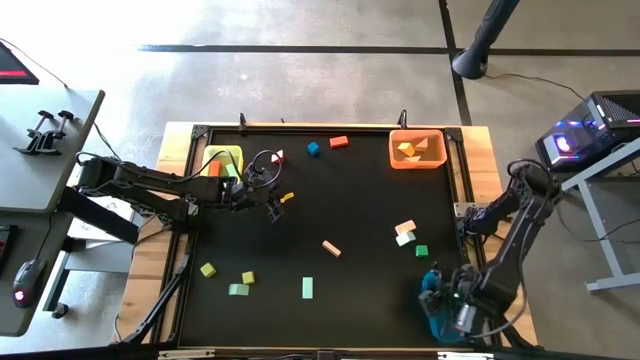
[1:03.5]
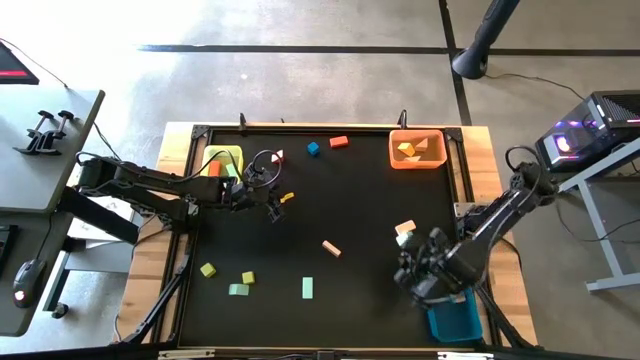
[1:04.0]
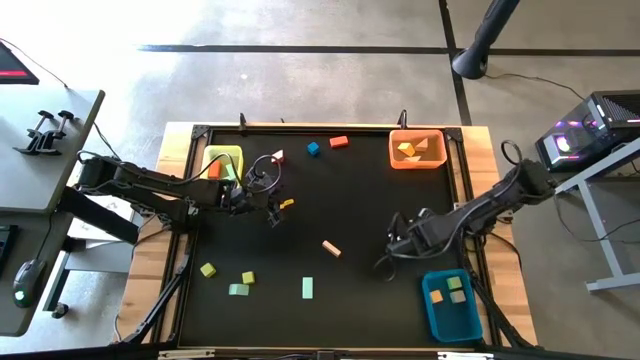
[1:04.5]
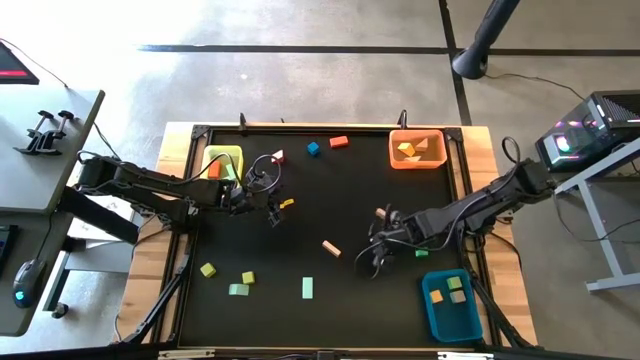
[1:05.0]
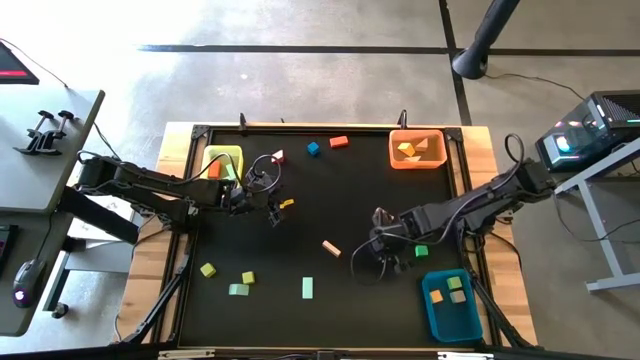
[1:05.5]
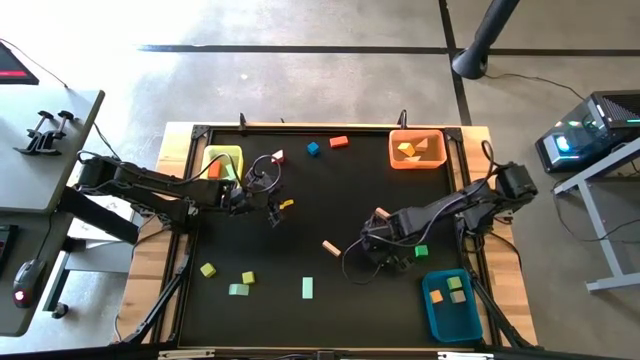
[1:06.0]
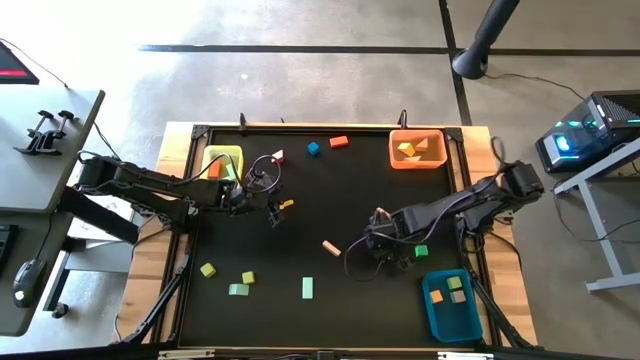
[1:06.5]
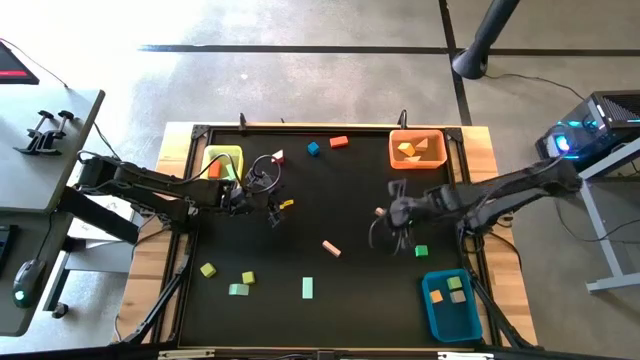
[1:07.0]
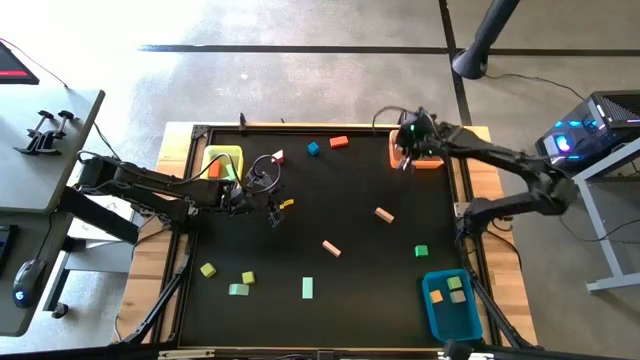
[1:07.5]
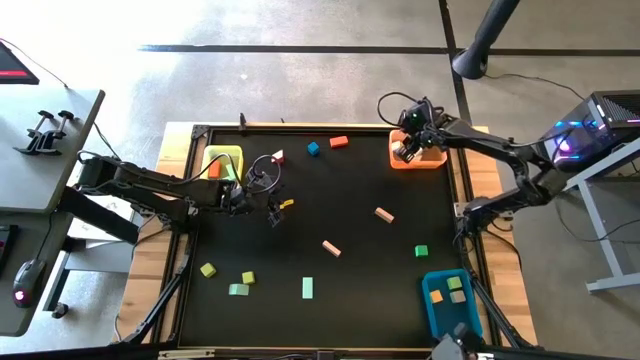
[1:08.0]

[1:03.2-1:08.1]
Task: Sort blocks by size
Put the light blue triangular block into the orange bin

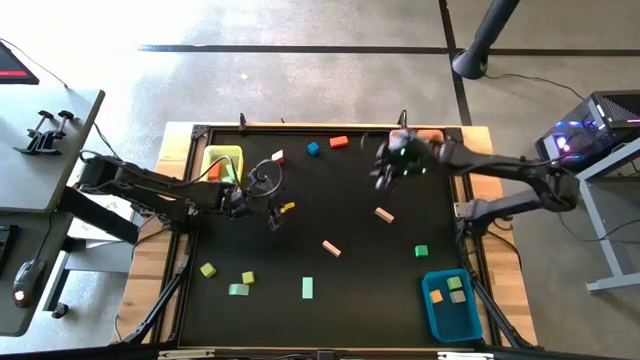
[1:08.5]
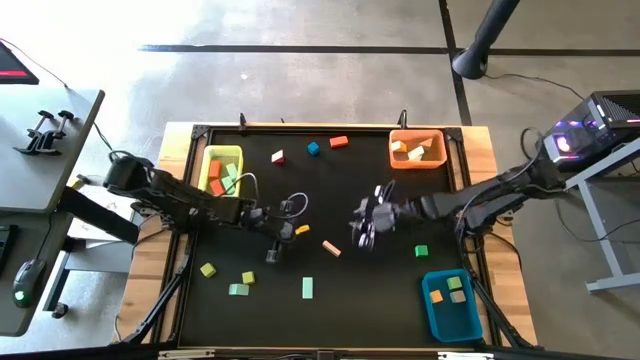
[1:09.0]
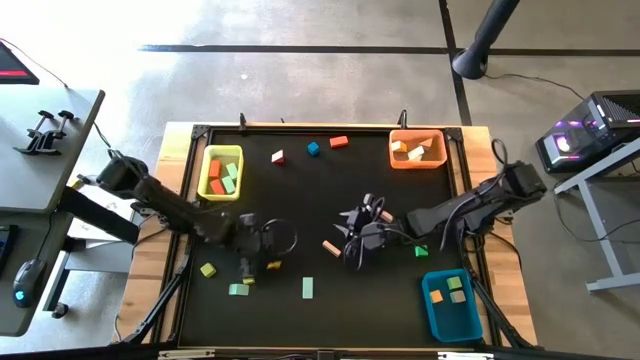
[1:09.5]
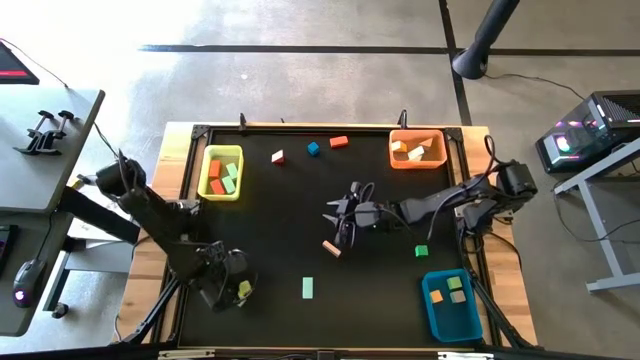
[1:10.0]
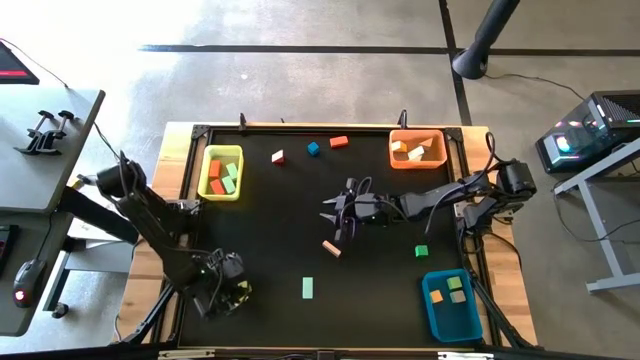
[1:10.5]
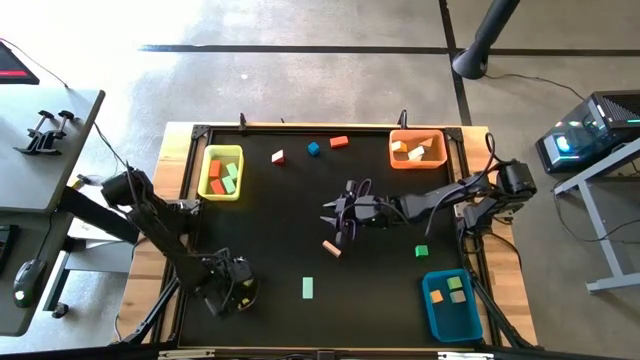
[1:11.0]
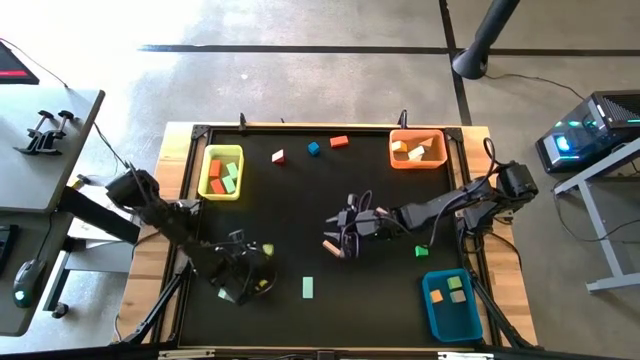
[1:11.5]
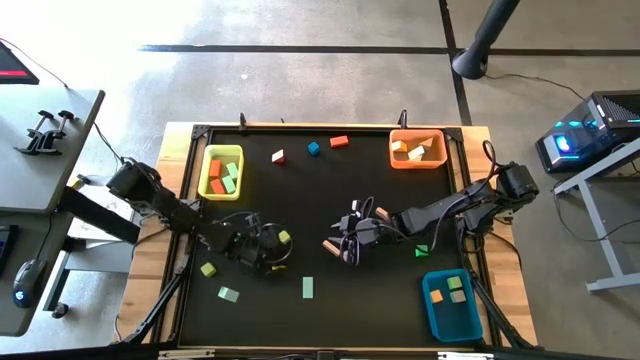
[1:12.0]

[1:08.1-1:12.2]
Put the yellow square block into the blue bin

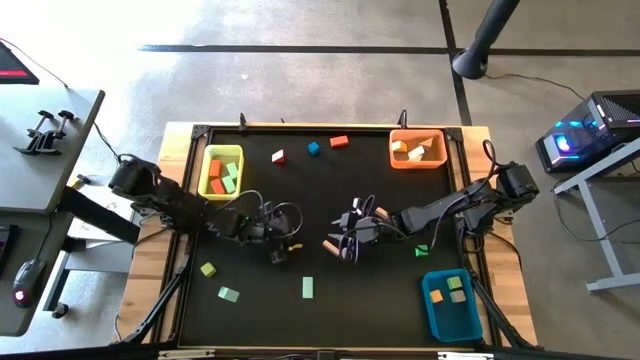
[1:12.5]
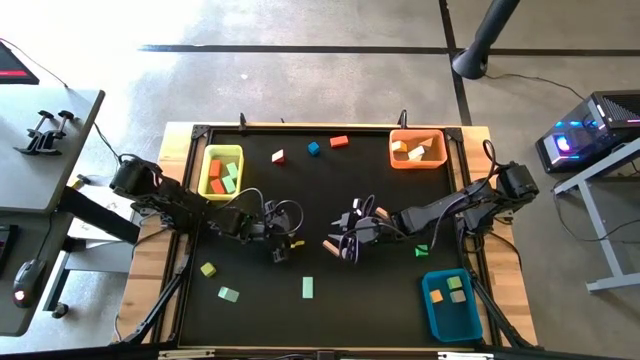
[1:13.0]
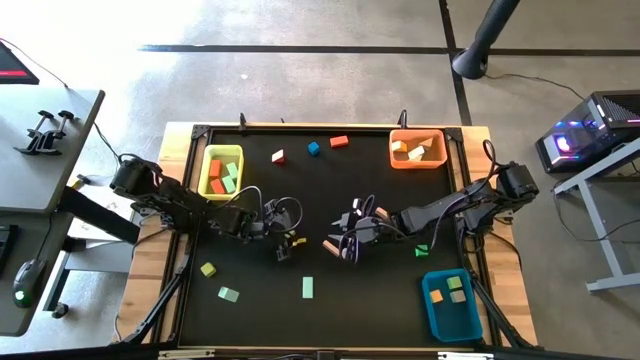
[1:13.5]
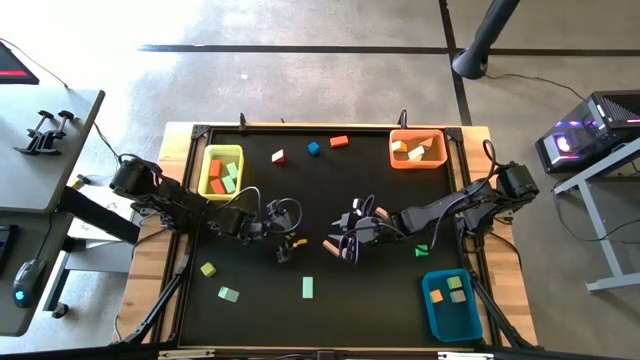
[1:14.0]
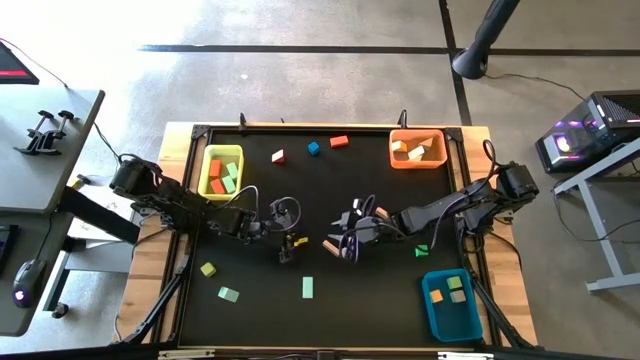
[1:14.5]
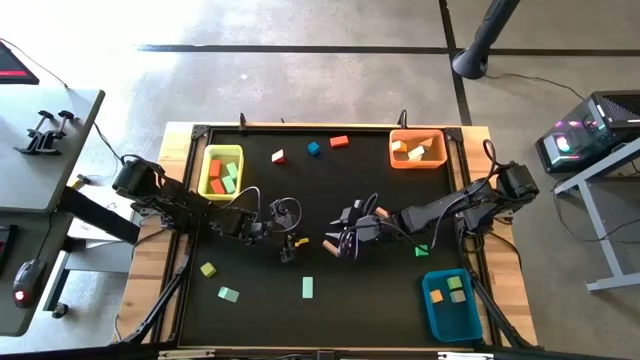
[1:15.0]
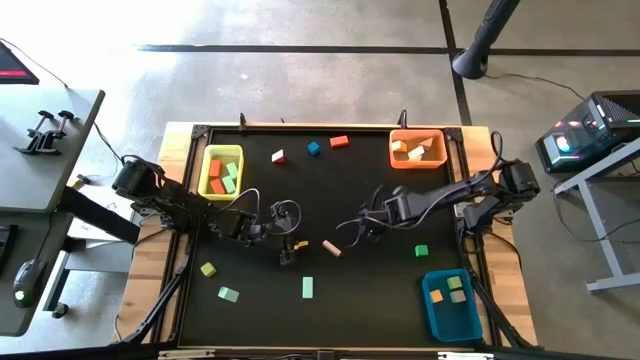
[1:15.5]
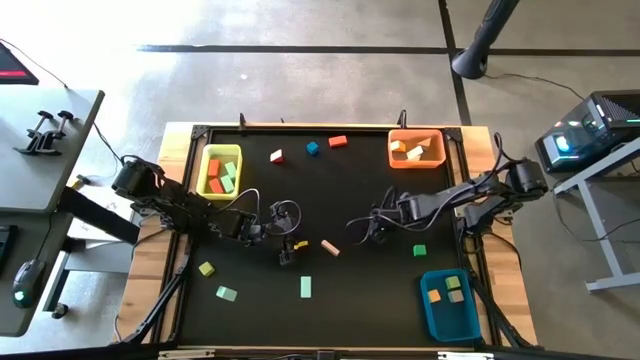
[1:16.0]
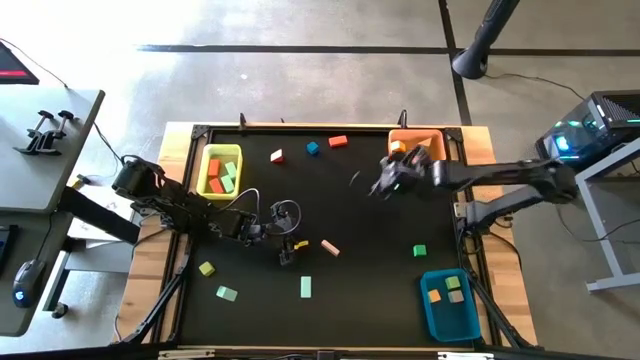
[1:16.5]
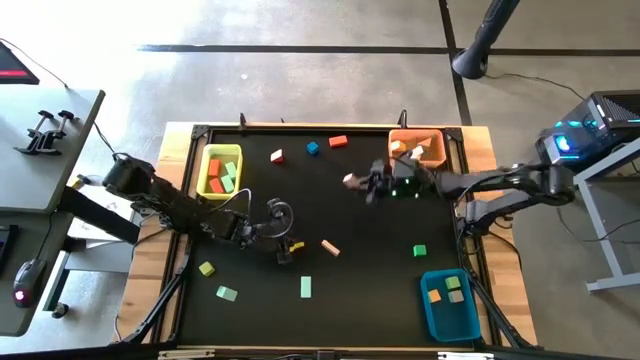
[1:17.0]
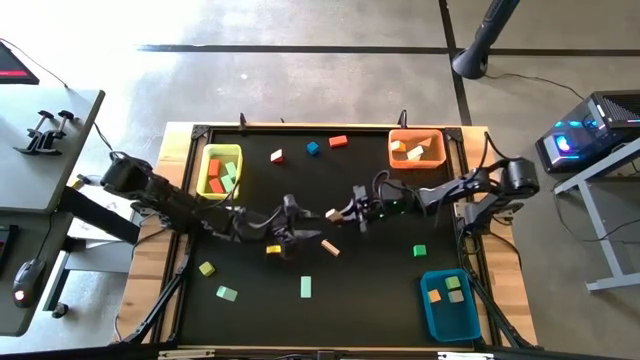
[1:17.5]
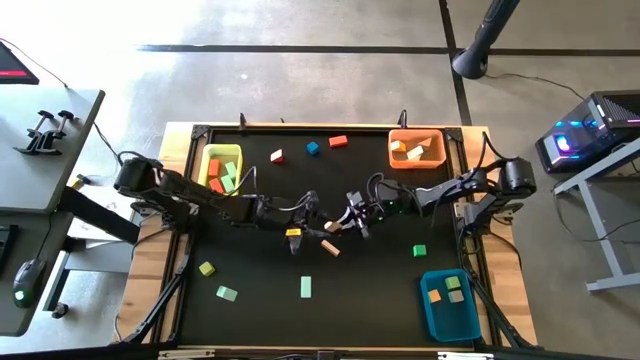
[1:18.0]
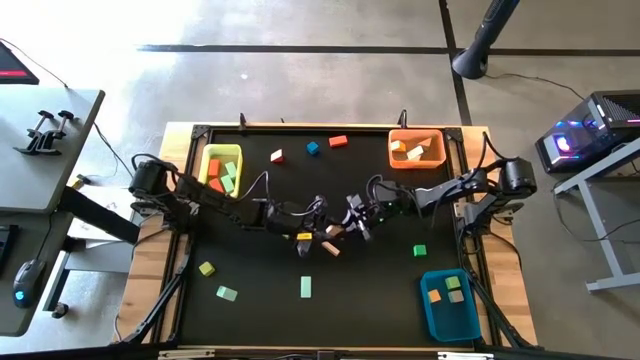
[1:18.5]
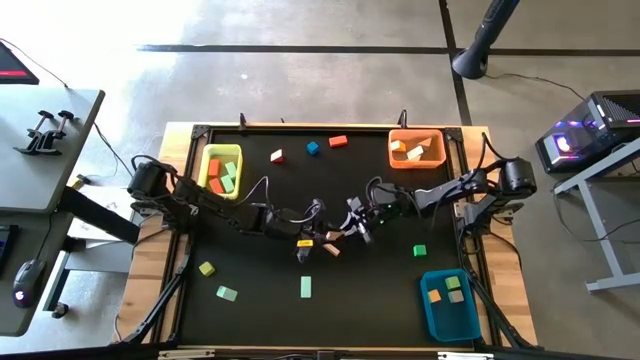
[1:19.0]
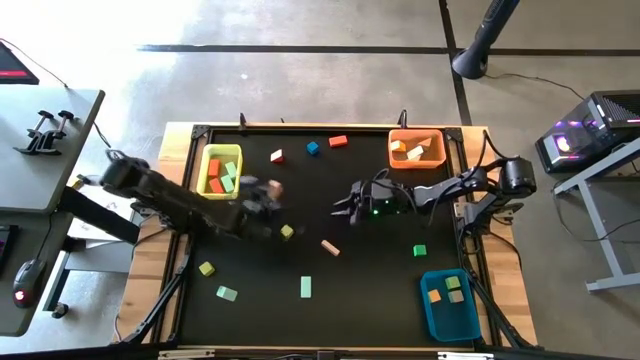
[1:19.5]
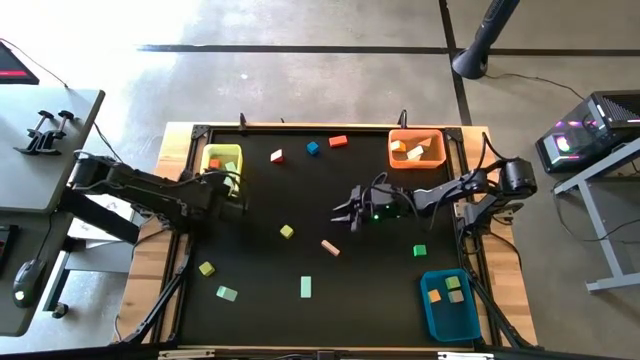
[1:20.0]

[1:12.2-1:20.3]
Put the light orange rectangular block into the yellow bin

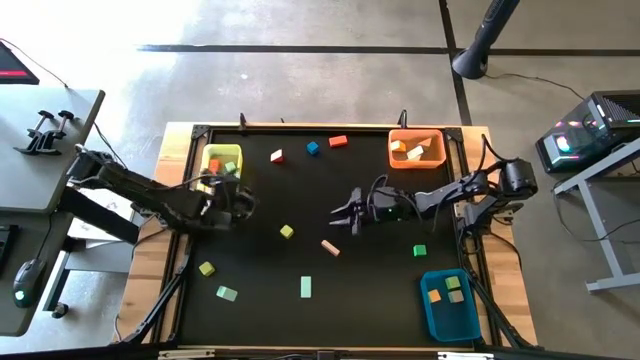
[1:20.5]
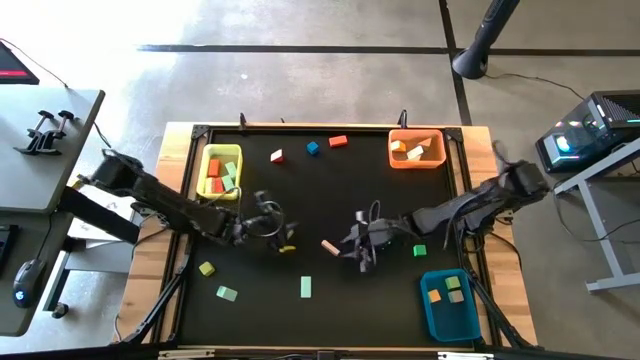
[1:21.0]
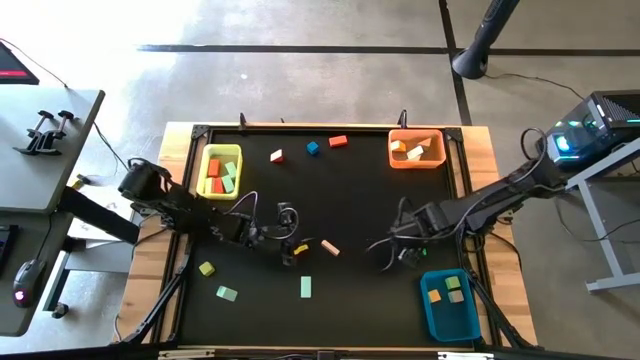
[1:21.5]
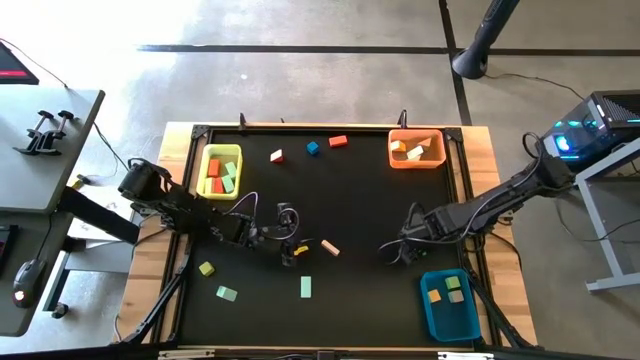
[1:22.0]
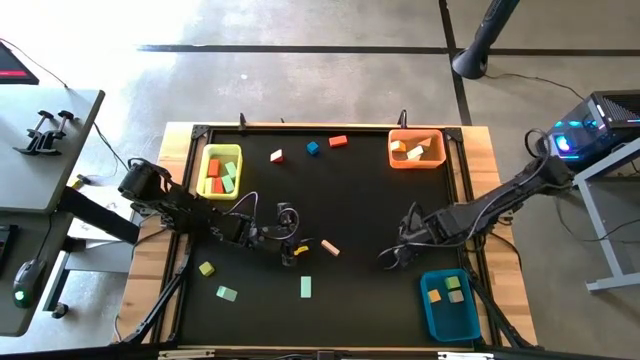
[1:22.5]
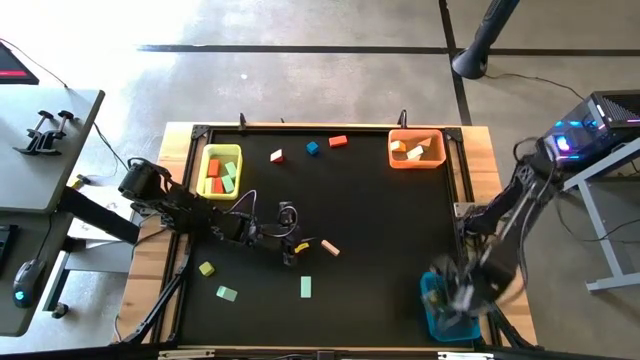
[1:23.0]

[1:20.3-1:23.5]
Put the green square block into the blue bin
